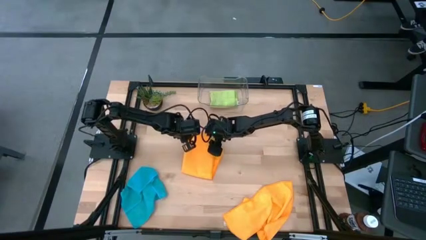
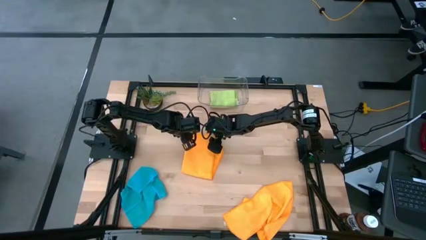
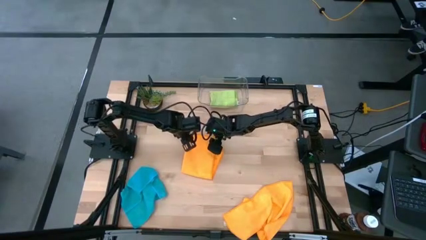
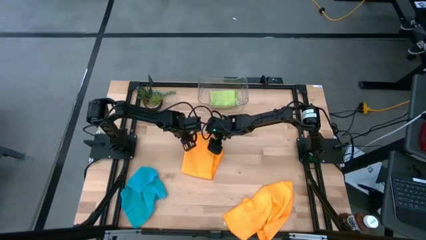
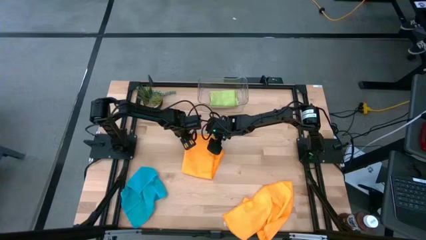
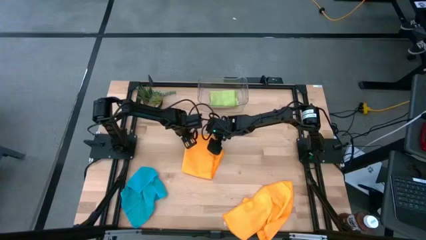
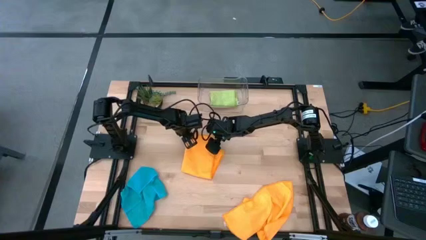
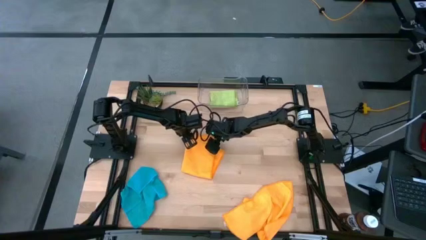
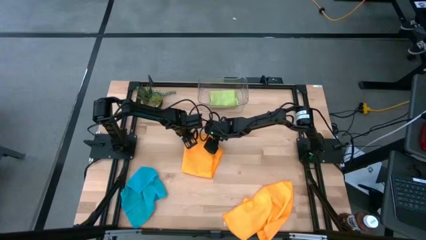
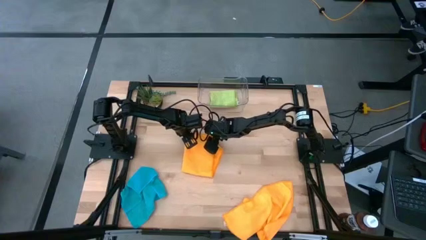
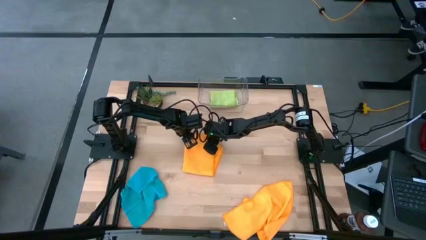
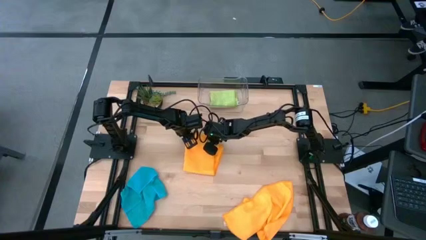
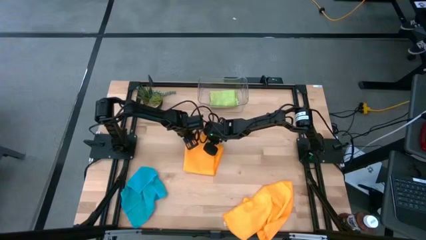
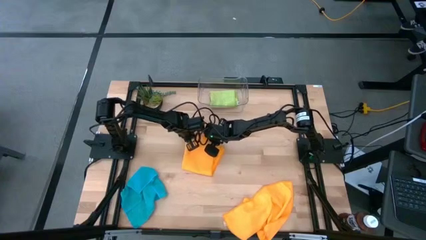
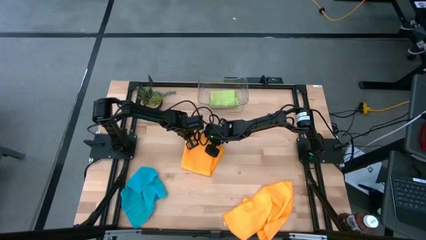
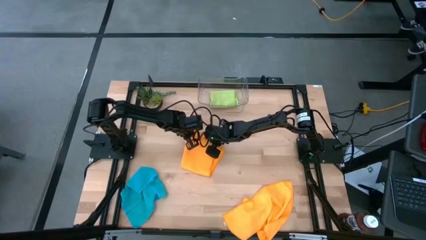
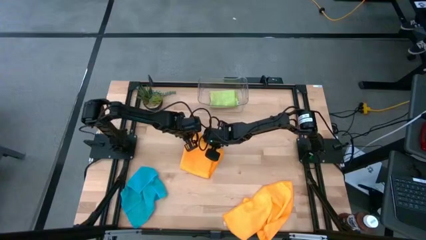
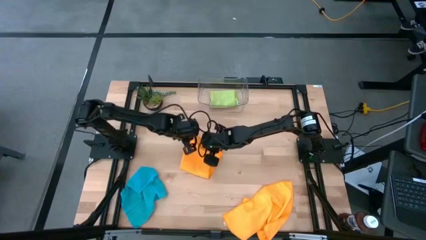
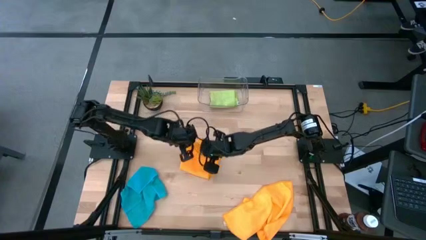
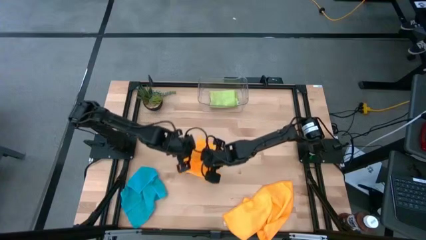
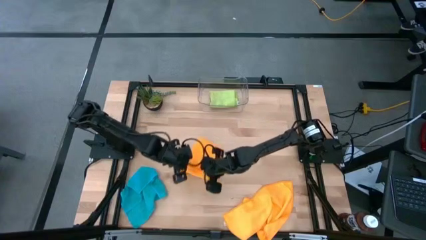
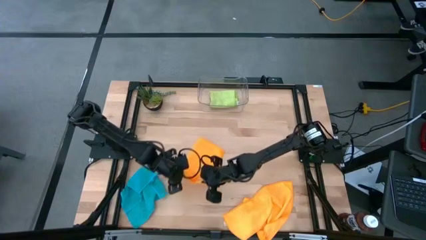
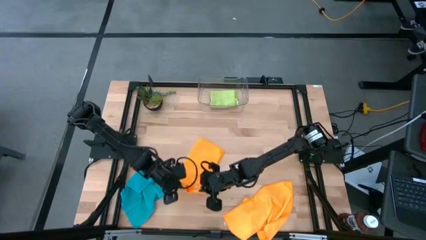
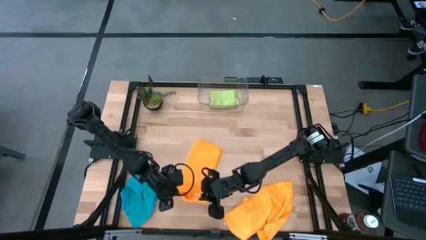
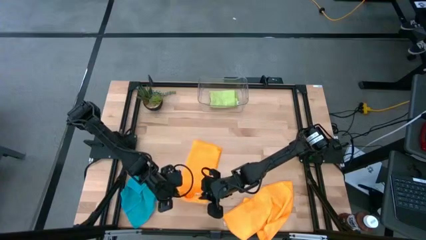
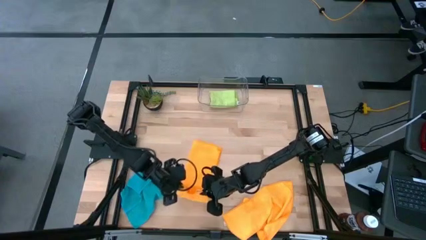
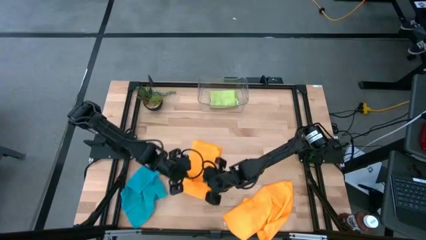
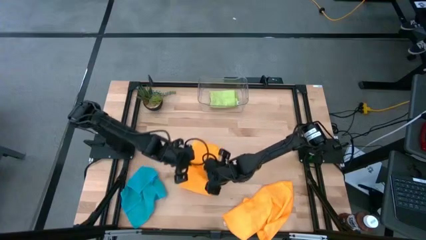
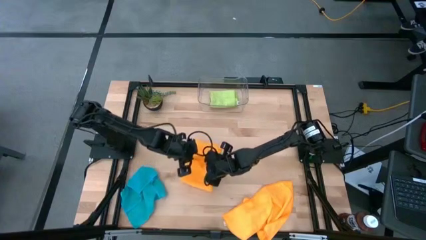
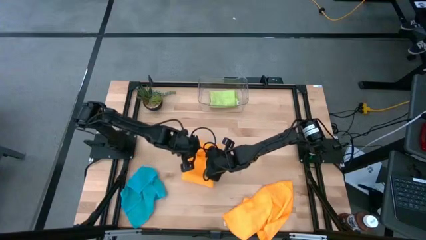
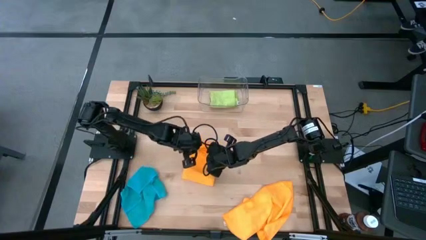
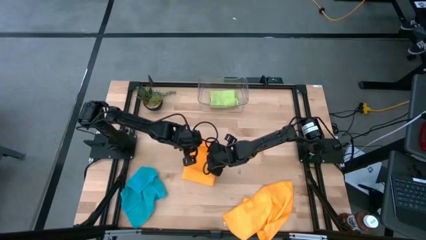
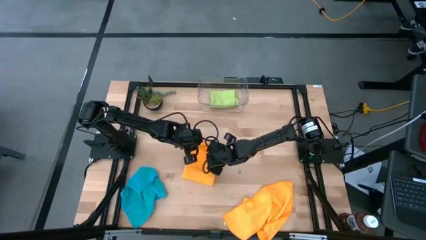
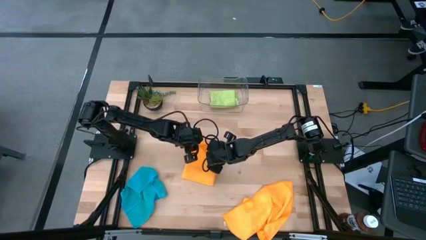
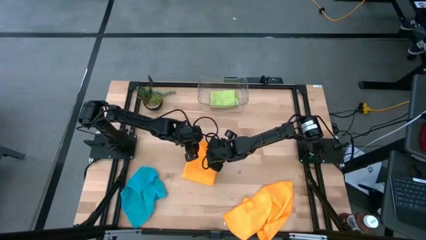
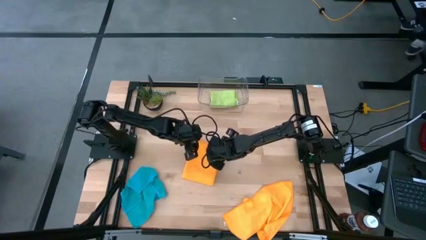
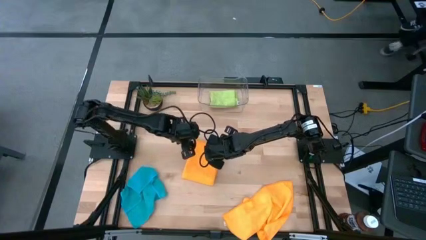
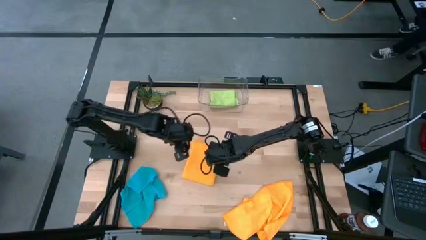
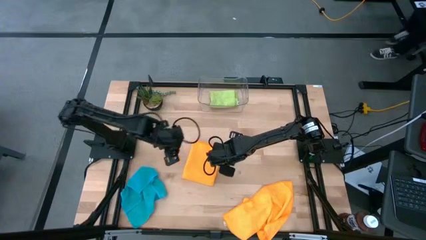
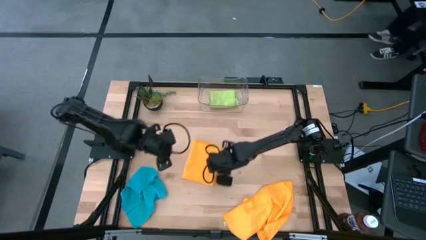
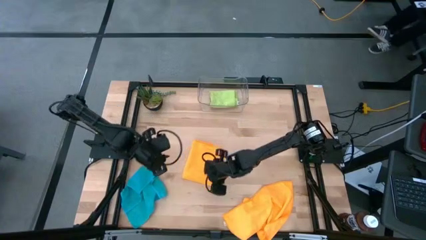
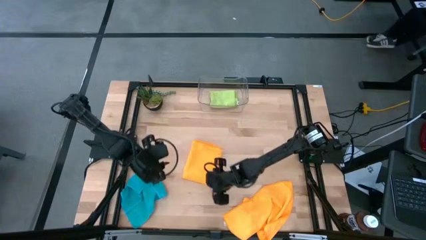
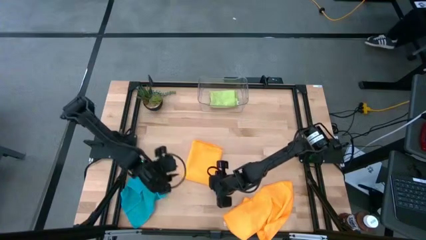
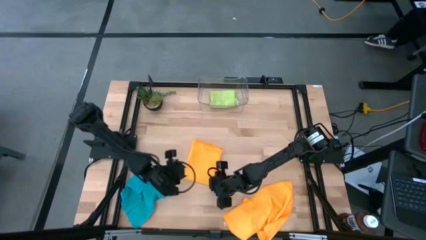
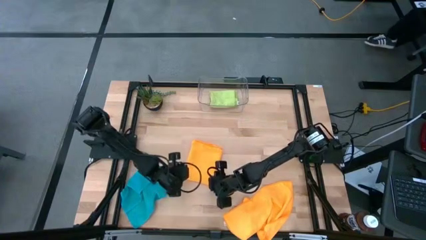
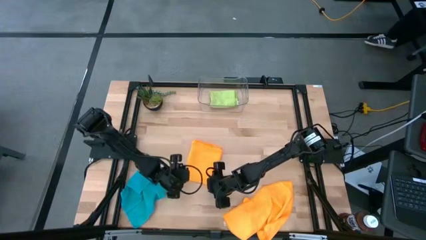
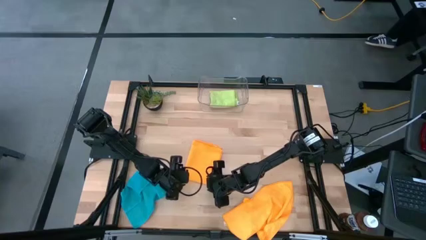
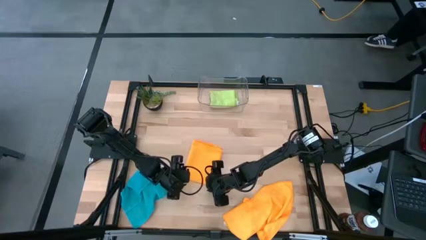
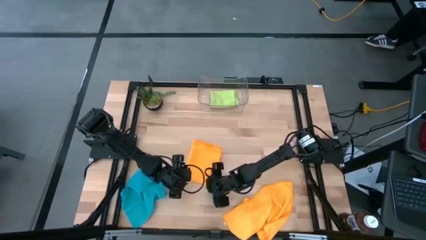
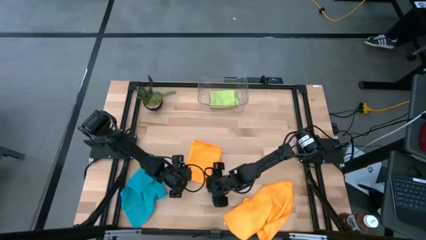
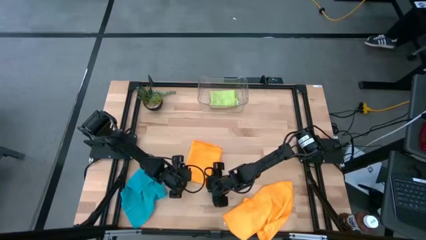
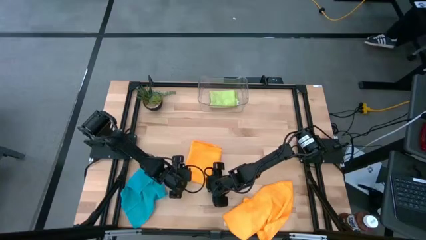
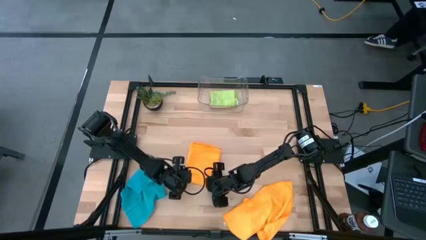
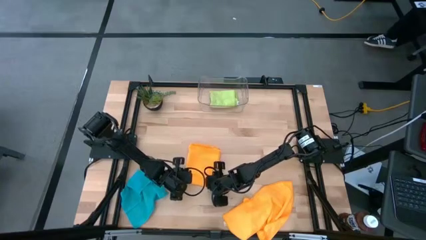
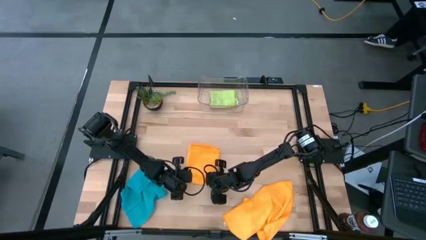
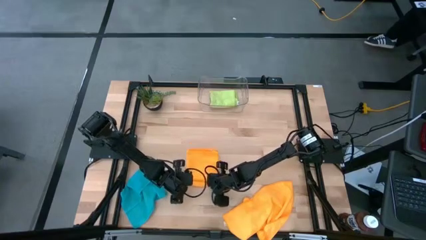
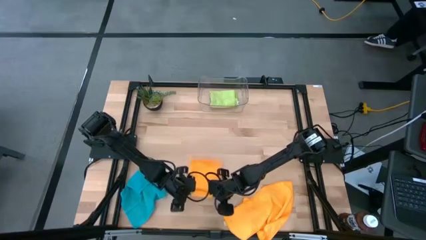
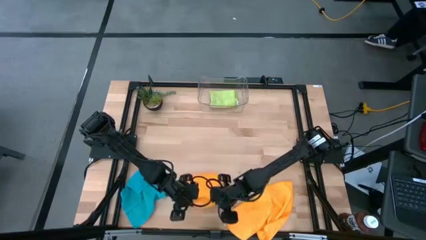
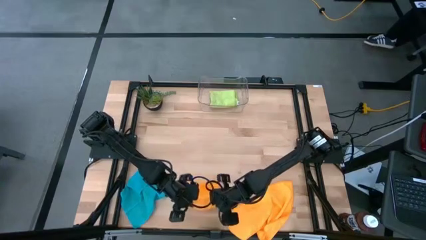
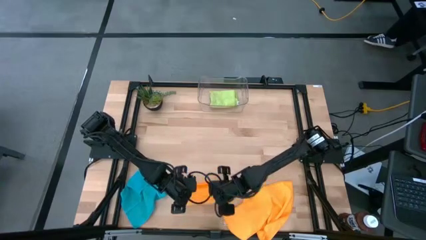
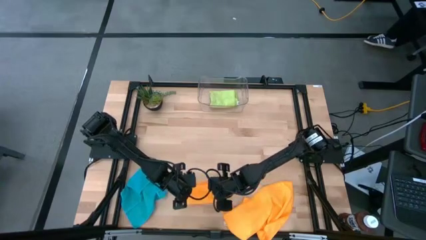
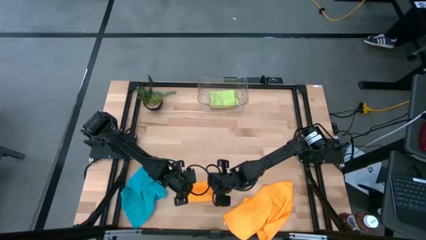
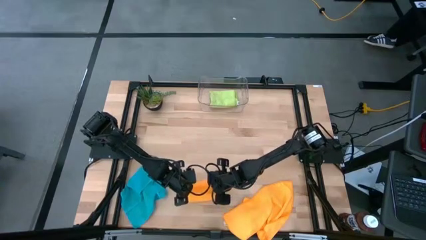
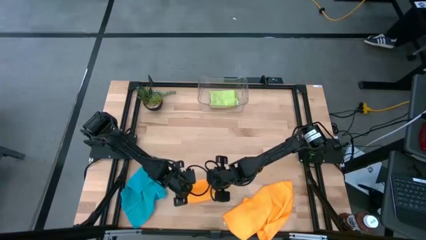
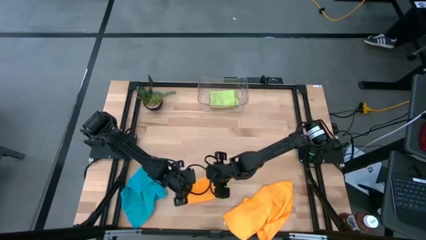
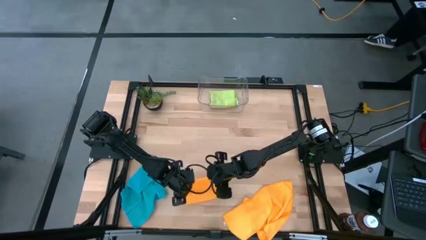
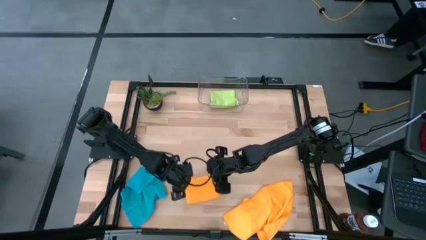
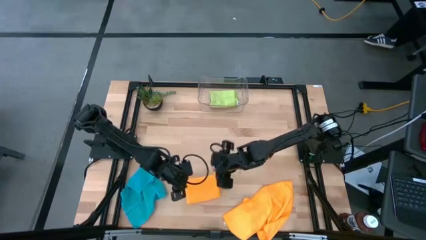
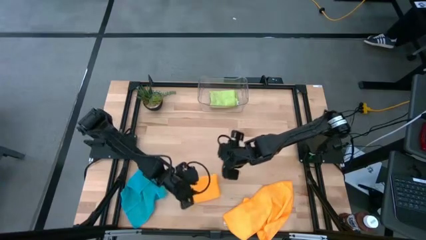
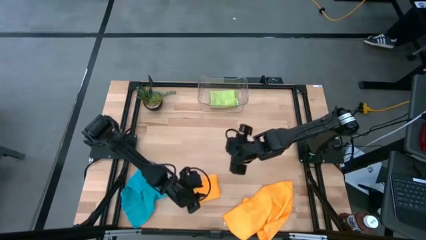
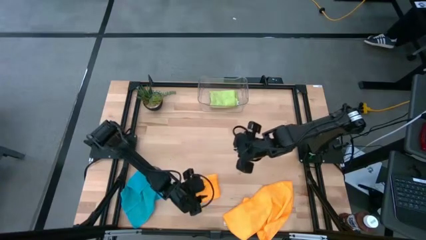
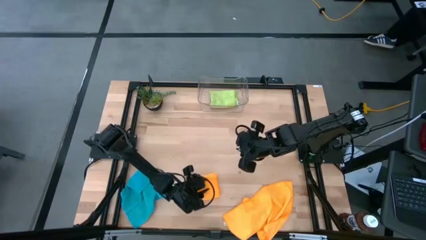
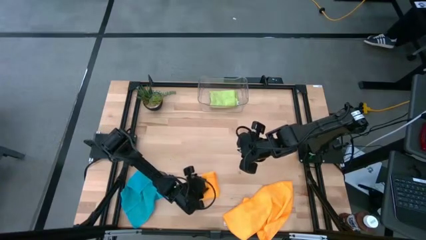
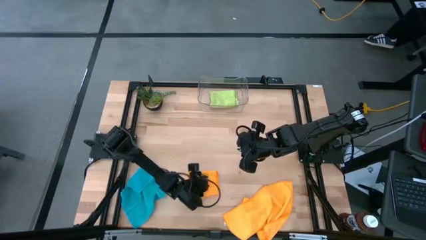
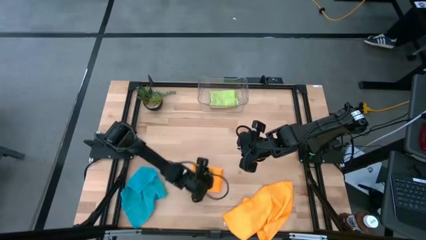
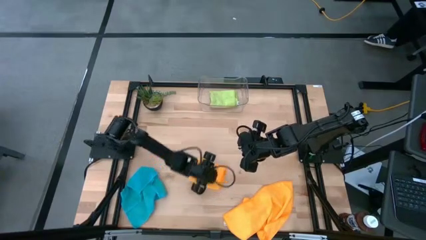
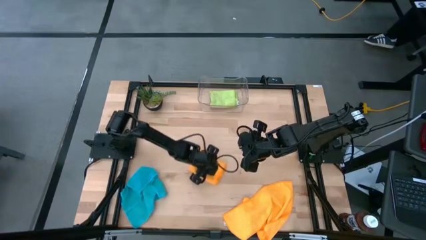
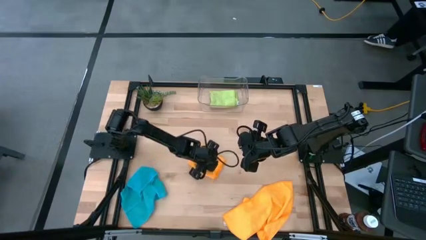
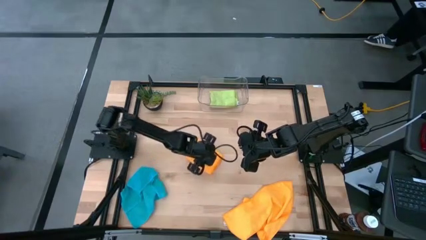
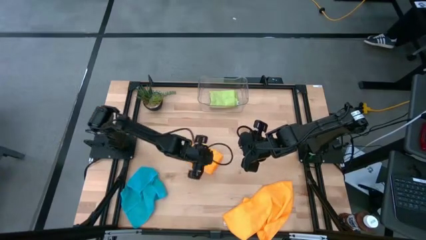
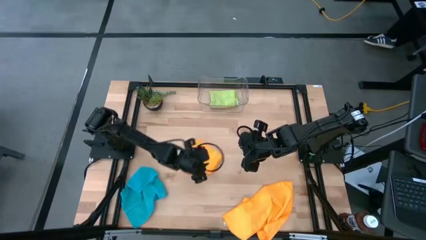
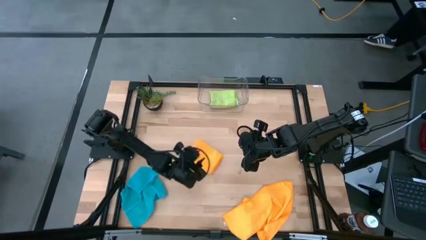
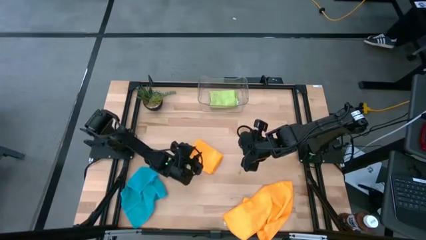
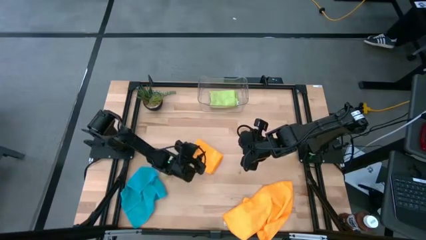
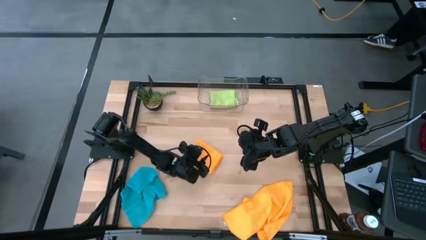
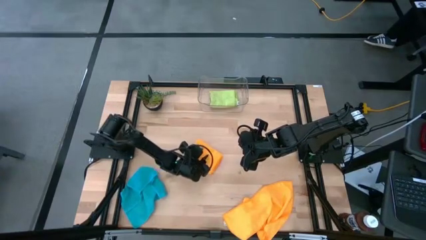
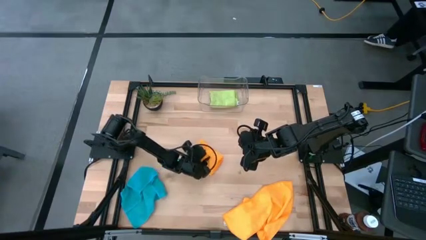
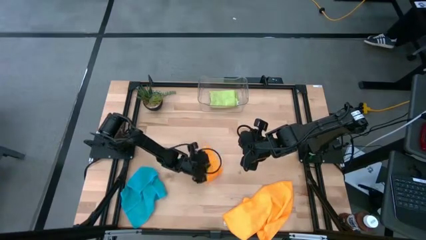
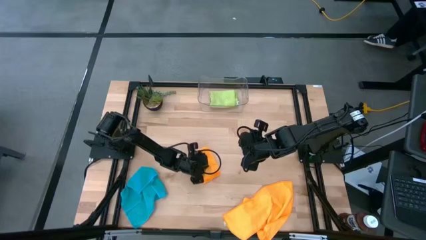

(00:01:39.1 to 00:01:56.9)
Task: Fold microfiber towels
Fold the top orange microfiber cloth
